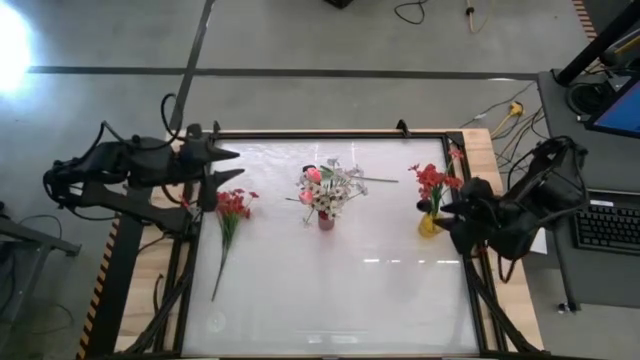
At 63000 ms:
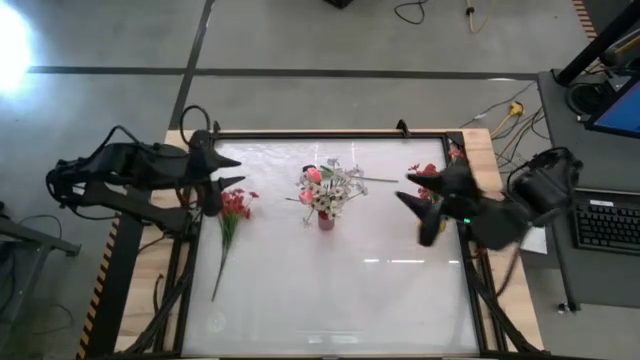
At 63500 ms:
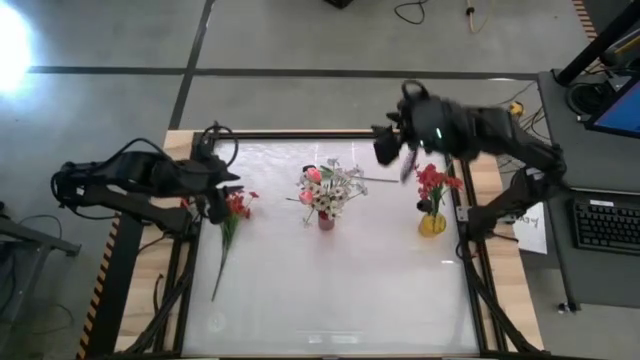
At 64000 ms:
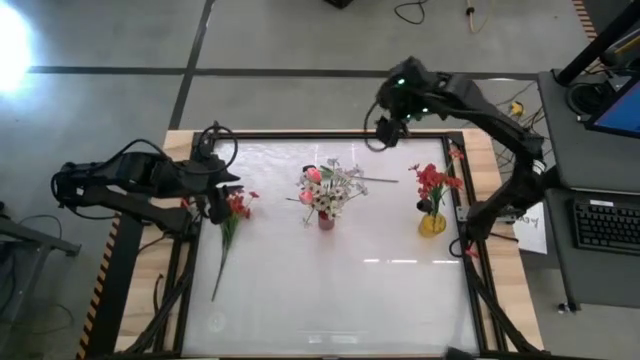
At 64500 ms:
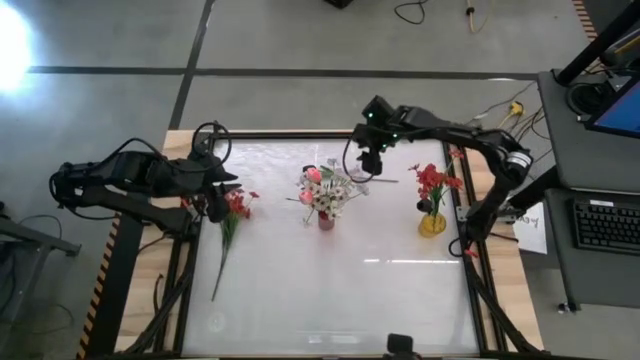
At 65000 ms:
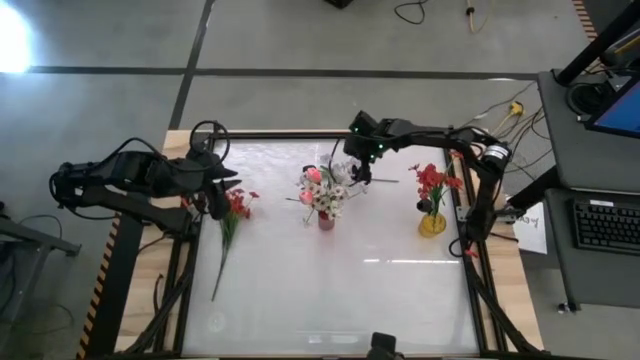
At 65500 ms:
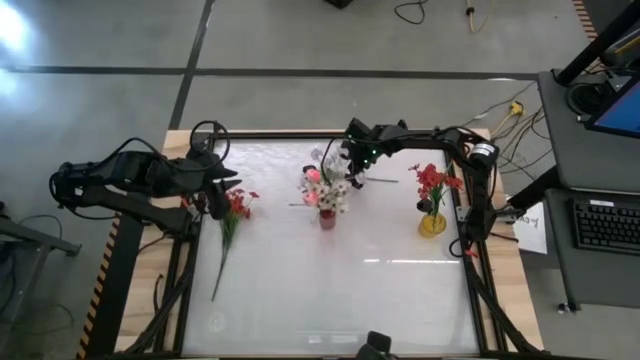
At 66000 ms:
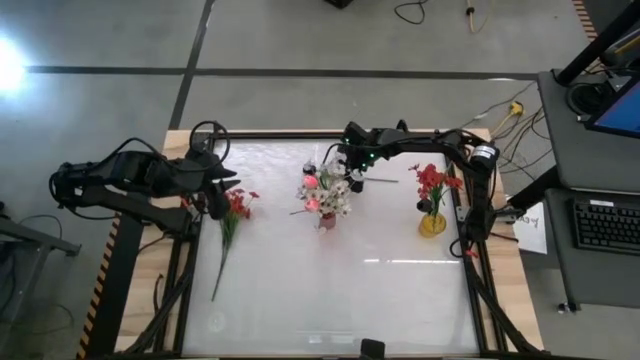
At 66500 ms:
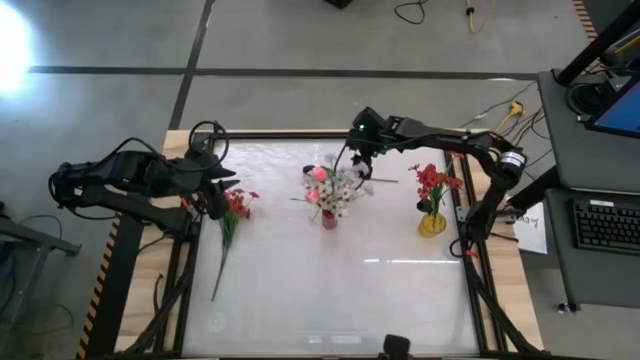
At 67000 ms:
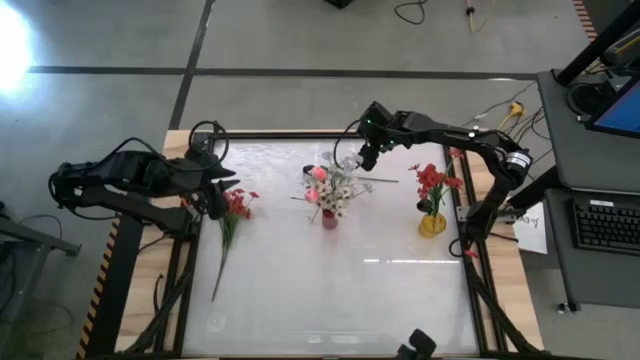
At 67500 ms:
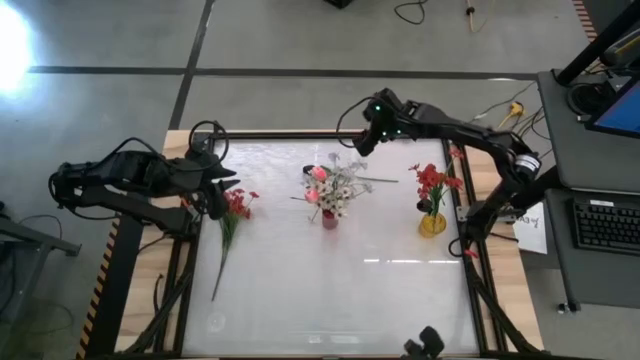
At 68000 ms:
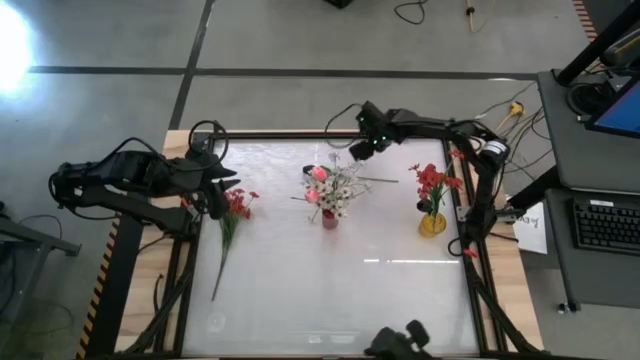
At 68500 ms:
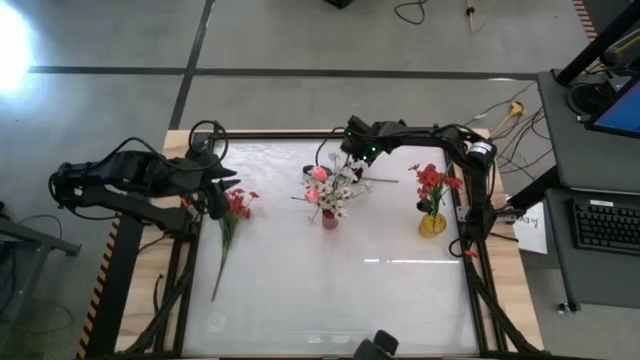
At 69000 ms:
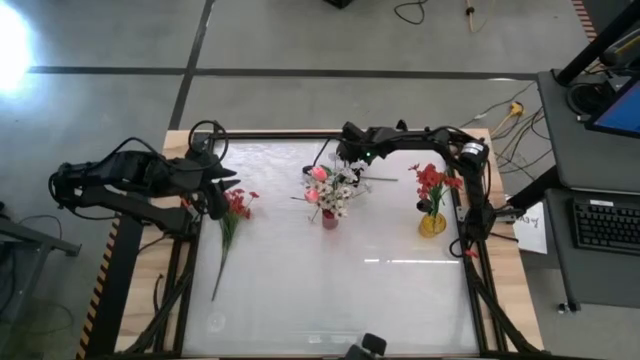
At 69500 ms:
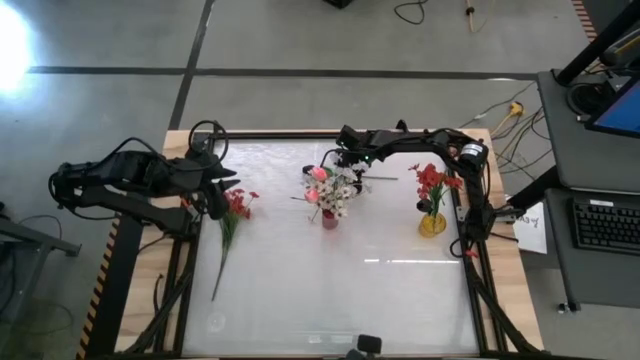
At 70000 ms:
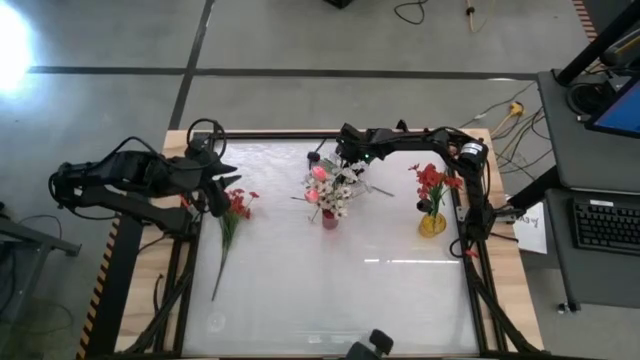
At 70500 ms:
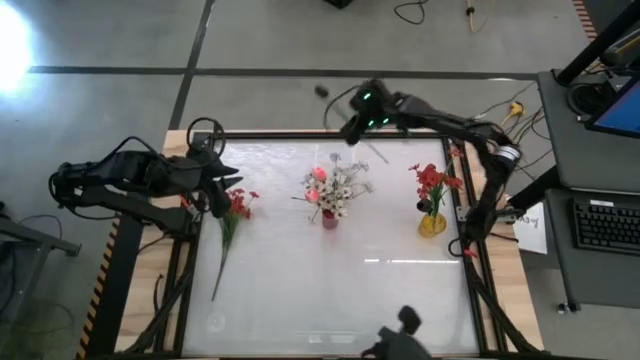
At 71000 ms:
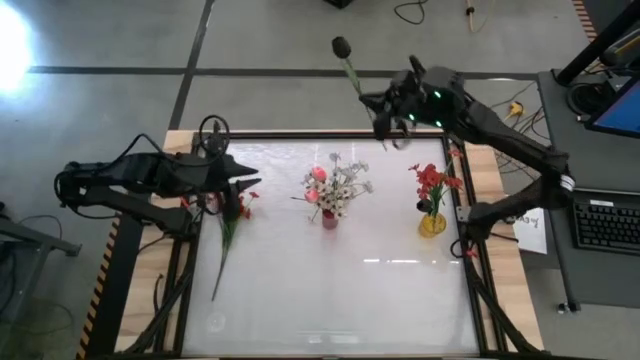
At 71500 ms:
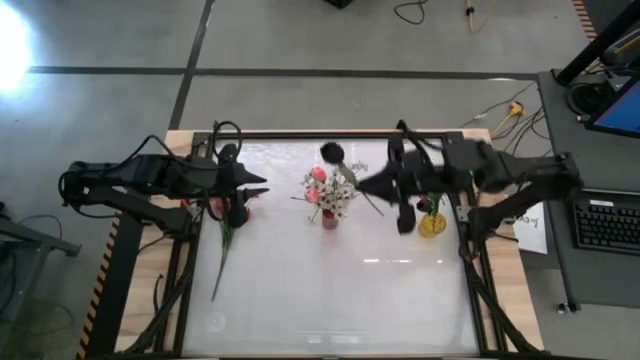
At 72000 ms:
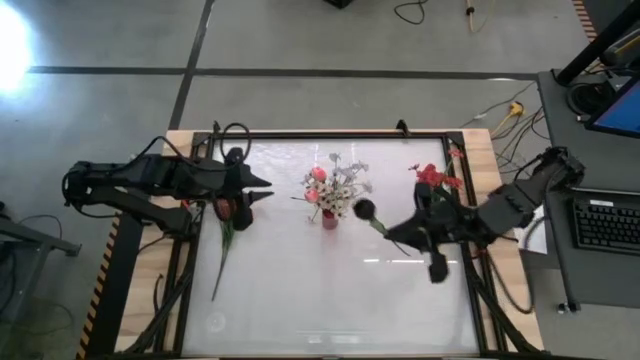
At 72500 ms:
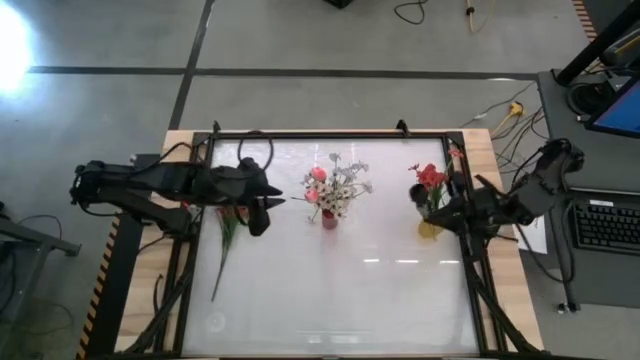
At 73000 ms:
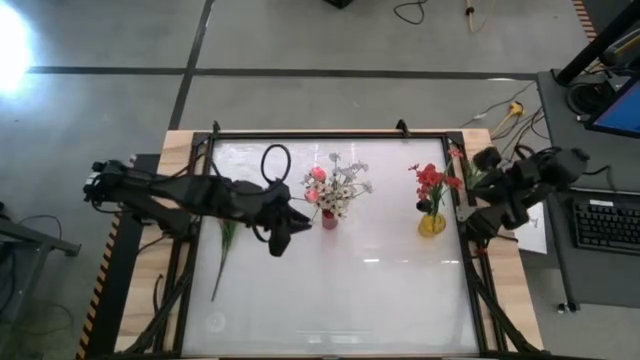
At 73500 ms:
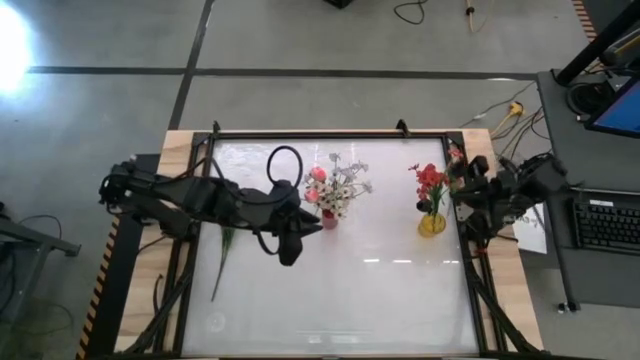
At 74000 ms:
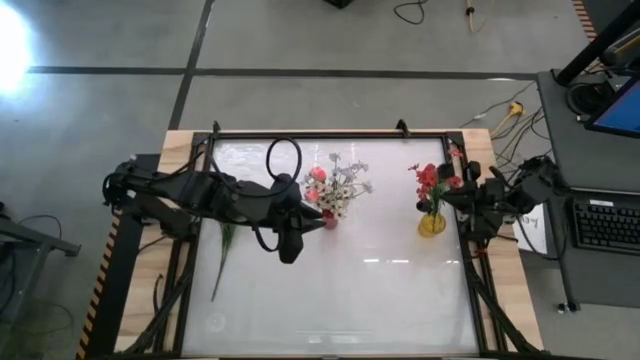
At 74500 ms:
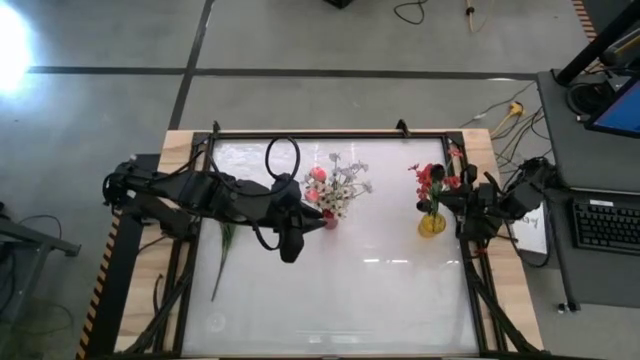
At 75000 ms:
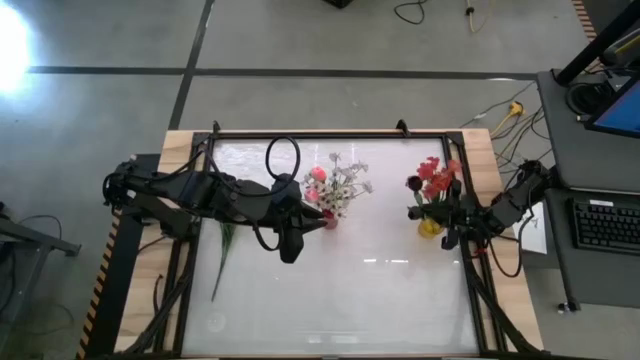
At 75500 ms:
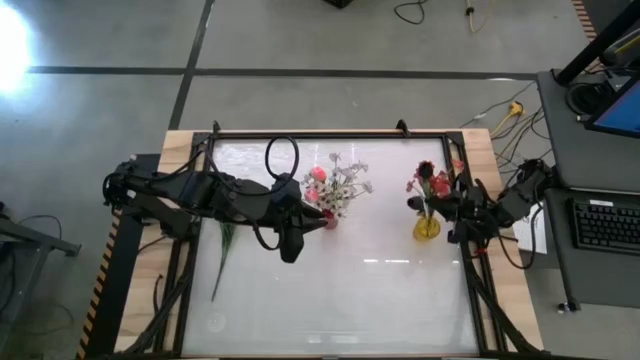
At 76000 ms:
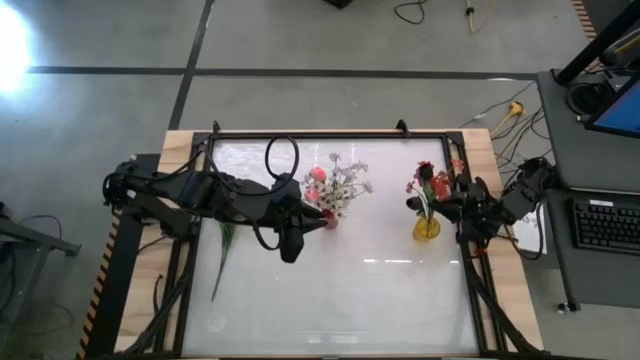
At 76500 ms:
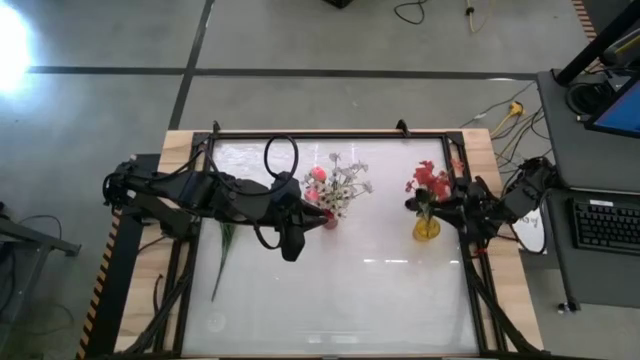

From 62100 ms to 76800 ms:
Task: Sort flowers into vase by color
Put the black flower into the yellow vase

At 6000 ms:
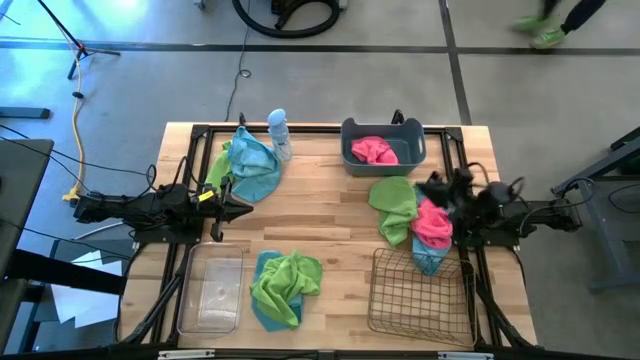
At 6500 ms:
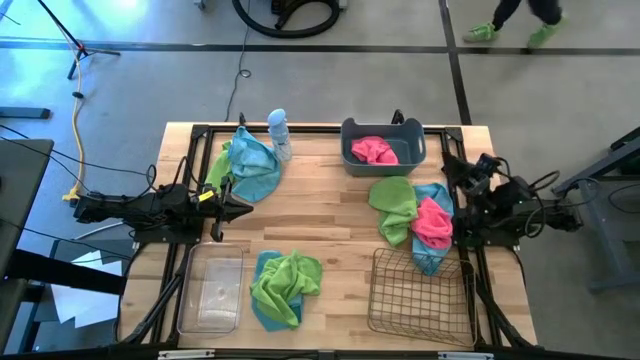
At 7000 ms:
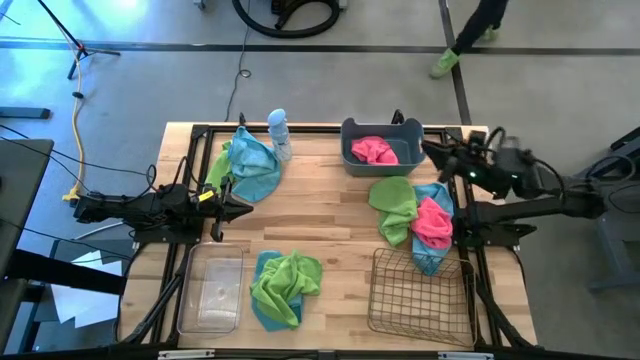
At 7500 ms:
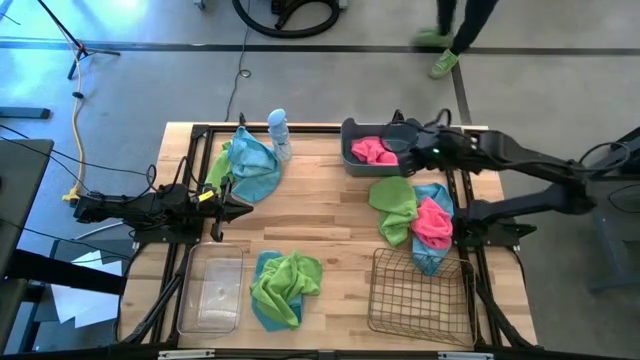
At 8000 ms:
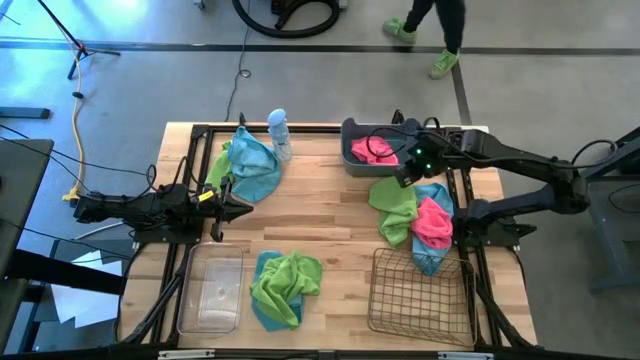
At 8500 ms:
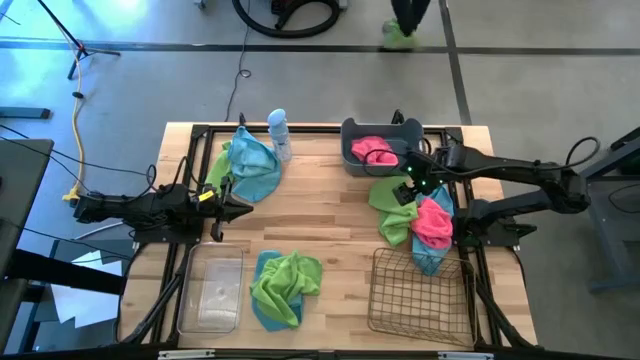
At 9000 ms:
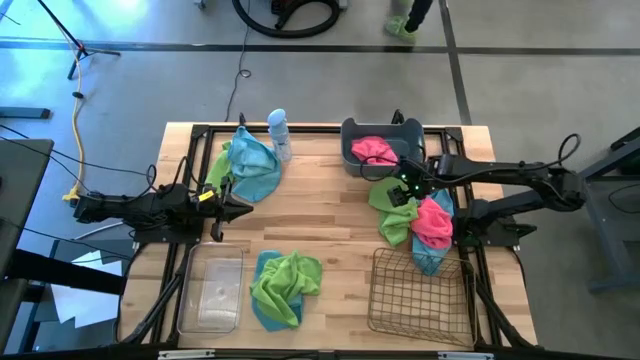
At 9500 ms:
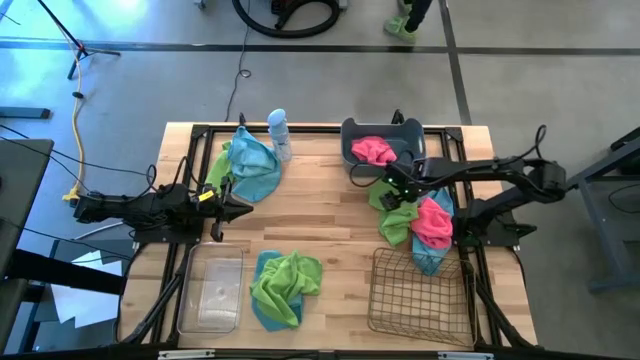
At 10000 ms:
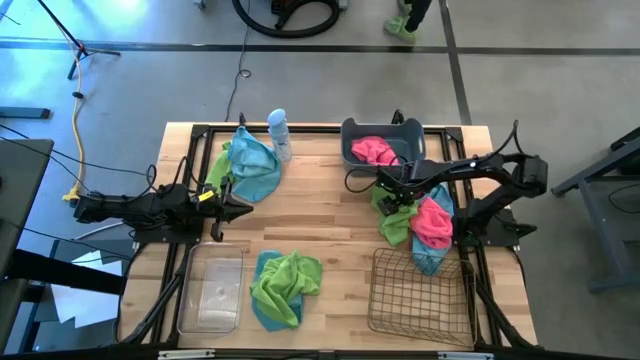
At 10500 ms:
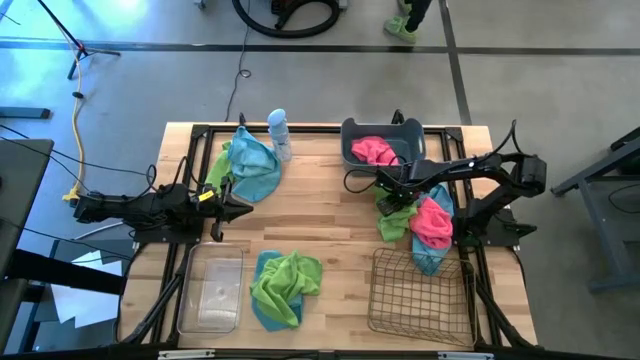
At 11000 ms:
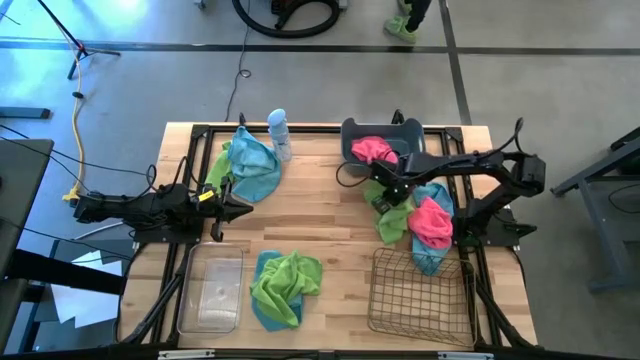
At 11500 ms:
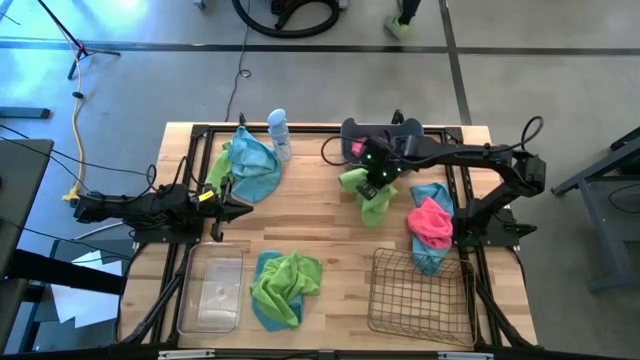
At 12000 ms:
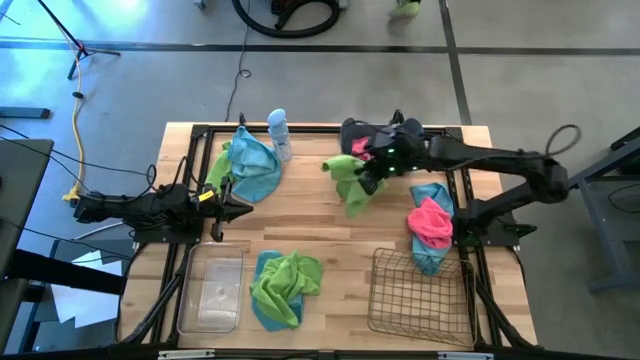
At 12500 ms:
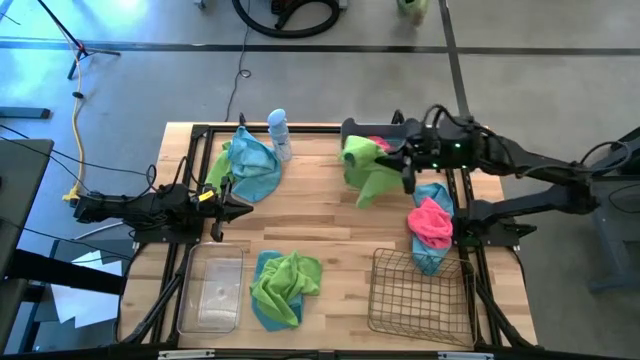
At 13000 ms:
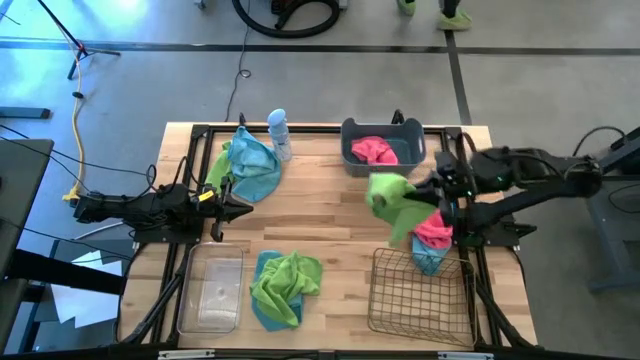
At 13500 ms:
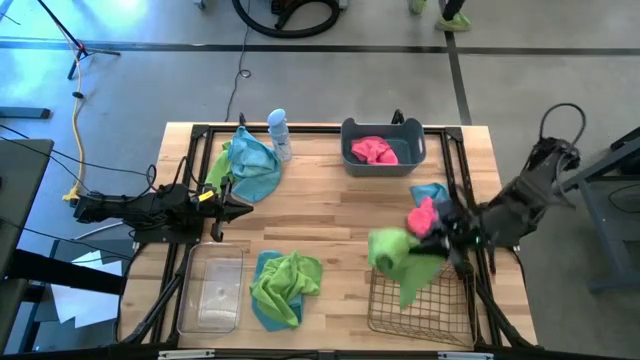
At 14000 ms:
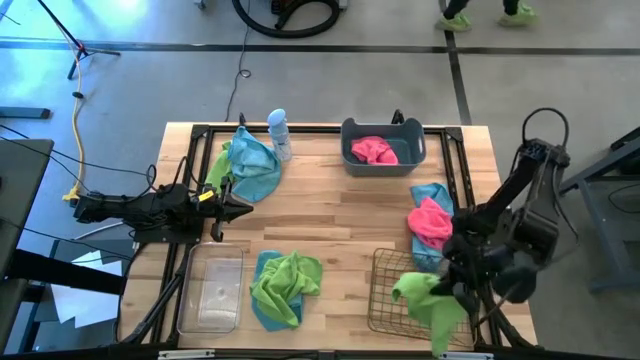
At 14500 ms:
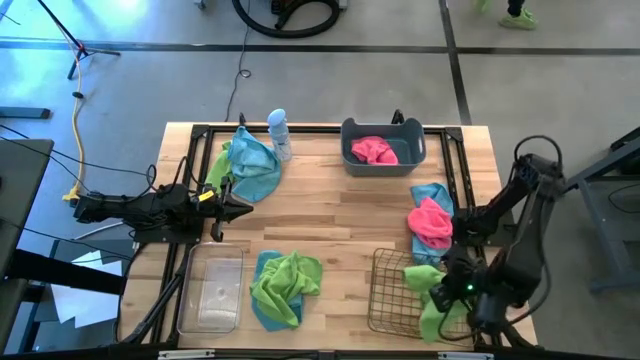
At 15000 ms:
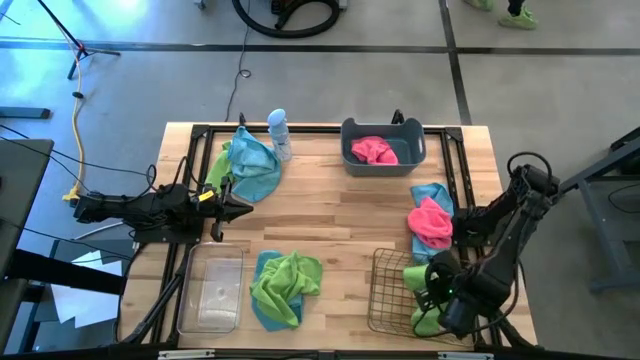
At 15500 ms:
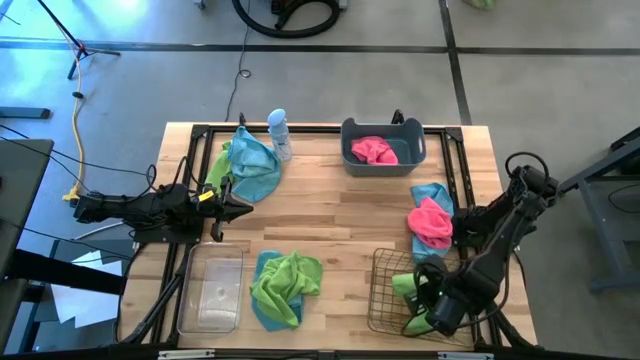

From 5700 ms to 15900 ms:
Task: Sort microfiber towel by color & place in baskets
Put the top right green microfiber towel into the wire basket
